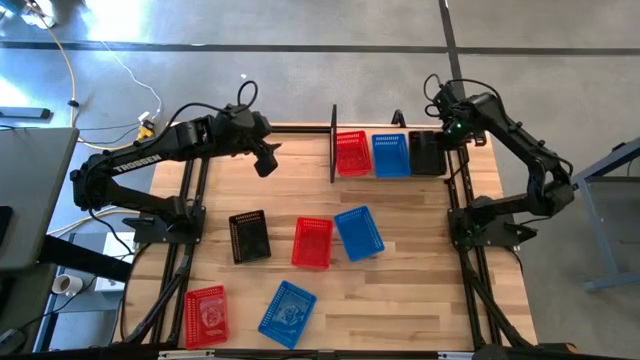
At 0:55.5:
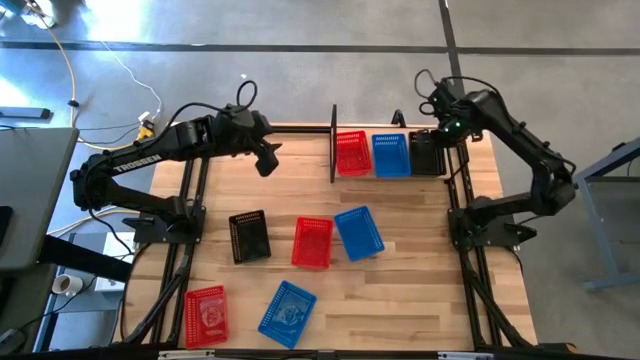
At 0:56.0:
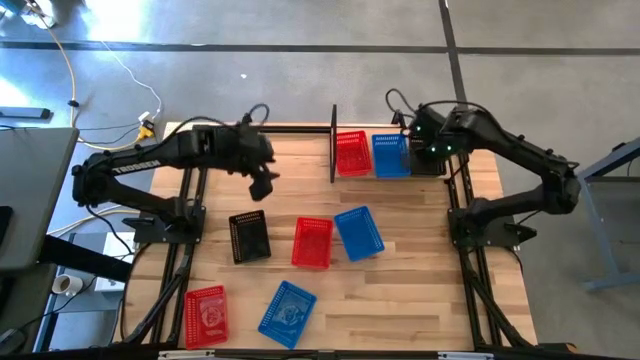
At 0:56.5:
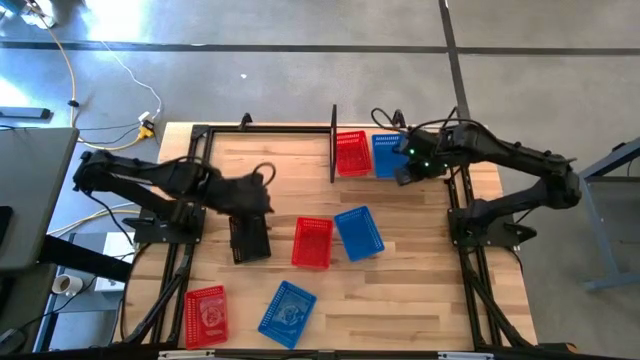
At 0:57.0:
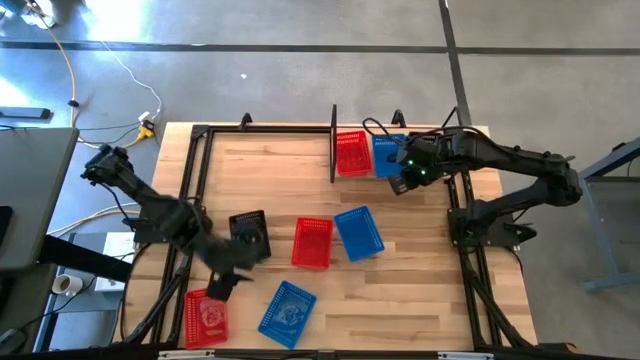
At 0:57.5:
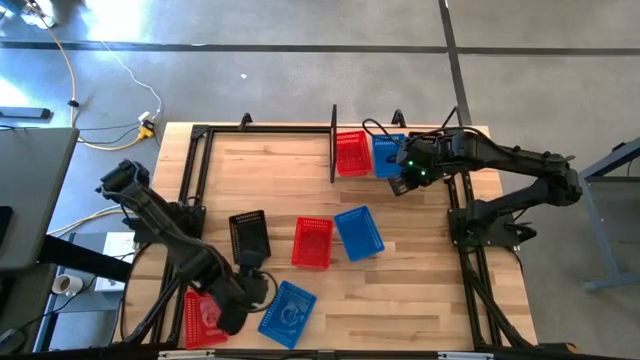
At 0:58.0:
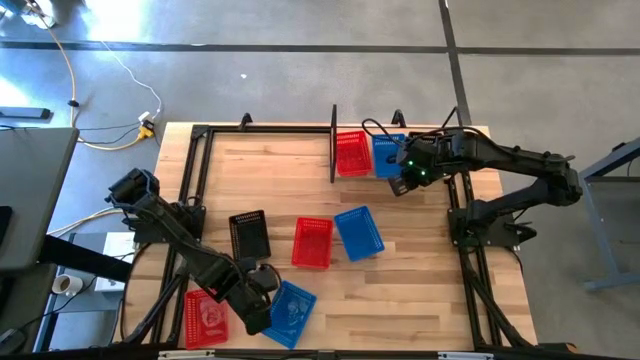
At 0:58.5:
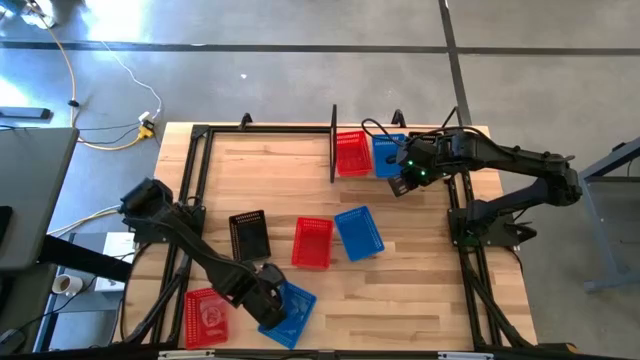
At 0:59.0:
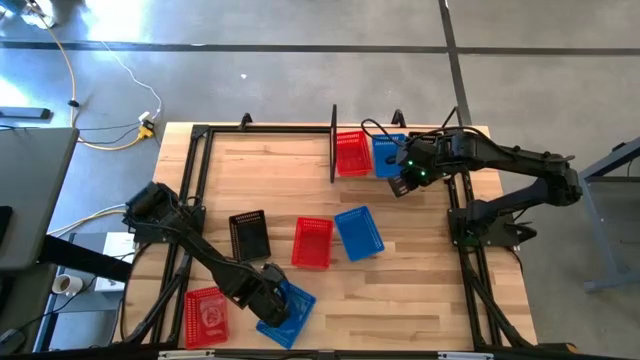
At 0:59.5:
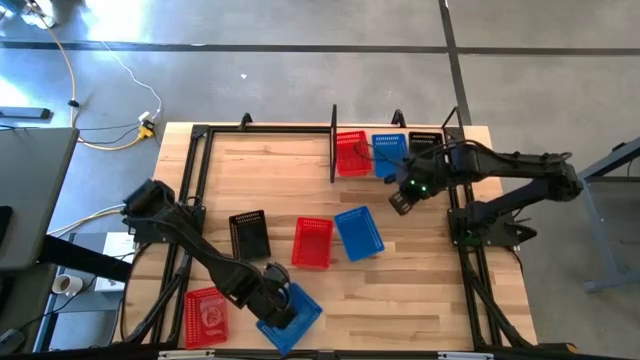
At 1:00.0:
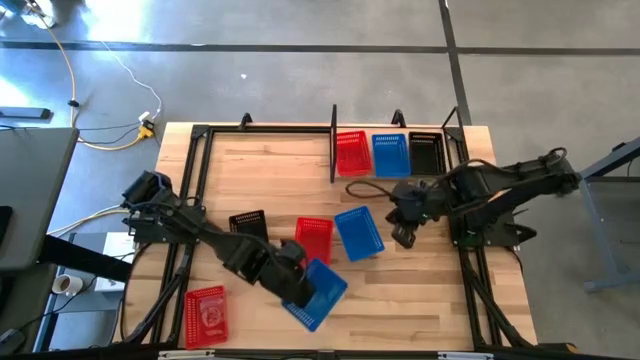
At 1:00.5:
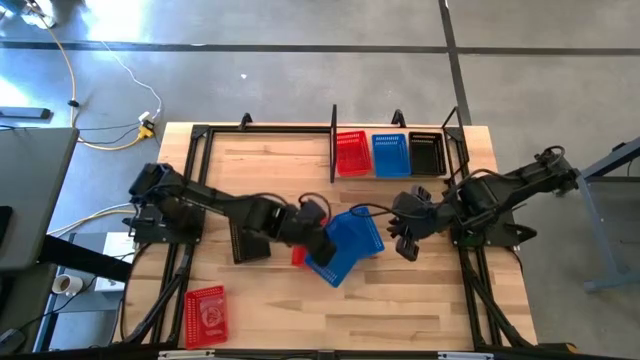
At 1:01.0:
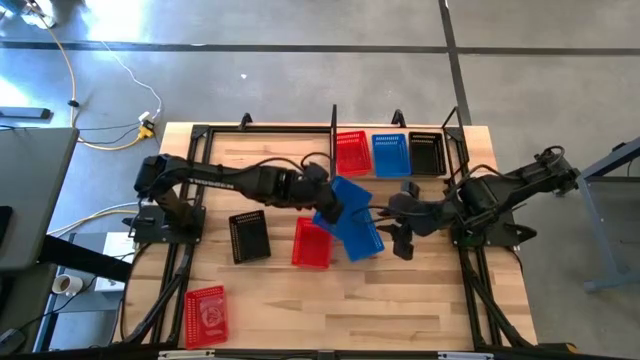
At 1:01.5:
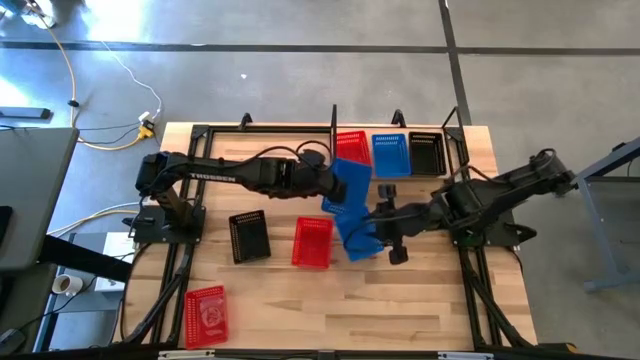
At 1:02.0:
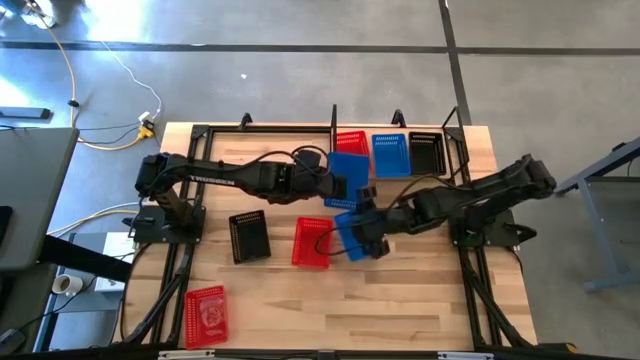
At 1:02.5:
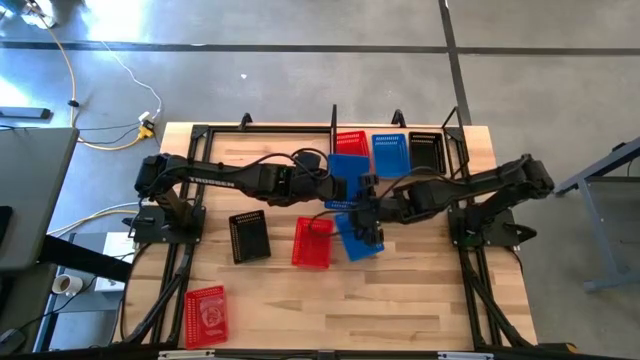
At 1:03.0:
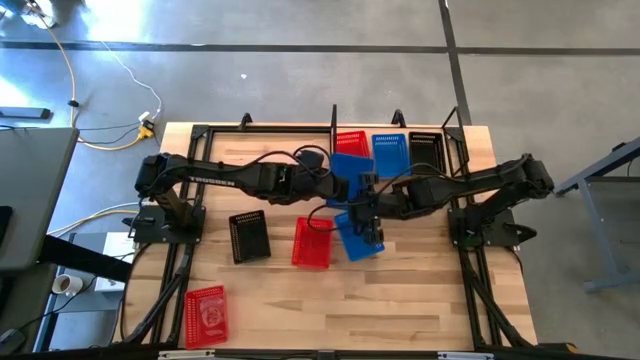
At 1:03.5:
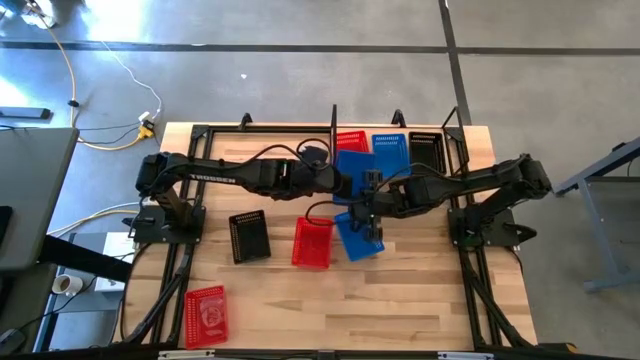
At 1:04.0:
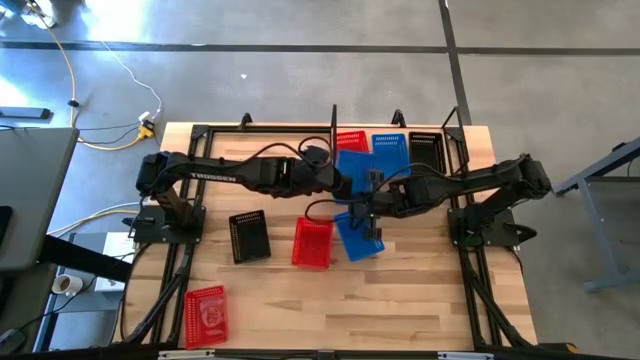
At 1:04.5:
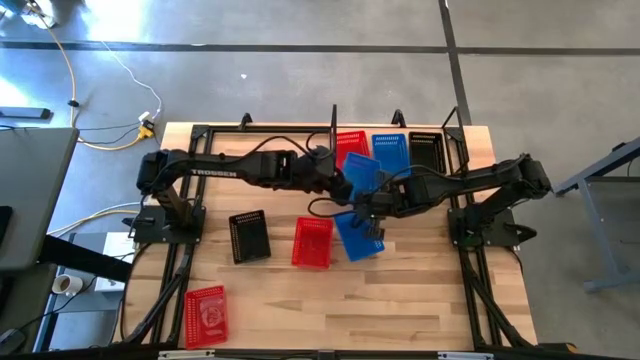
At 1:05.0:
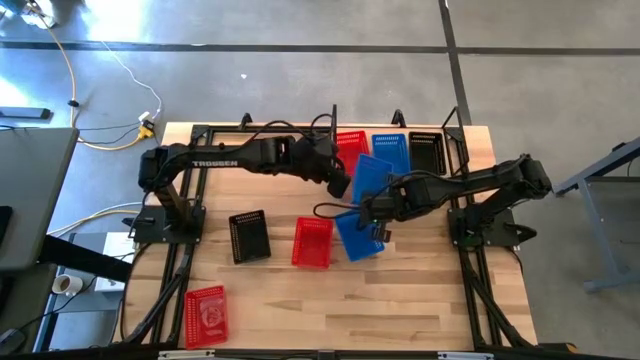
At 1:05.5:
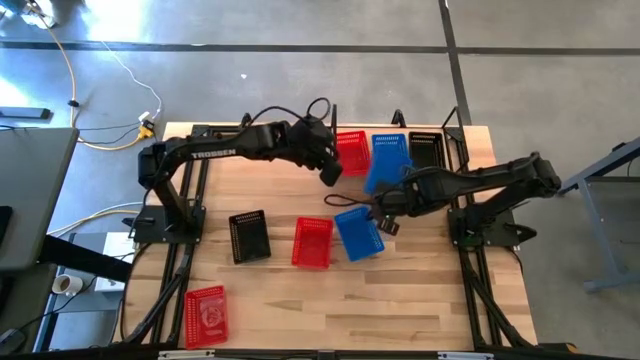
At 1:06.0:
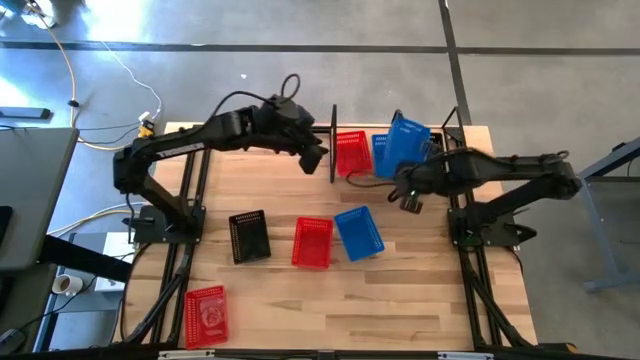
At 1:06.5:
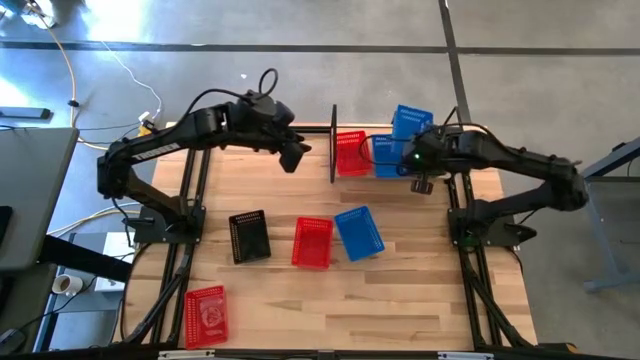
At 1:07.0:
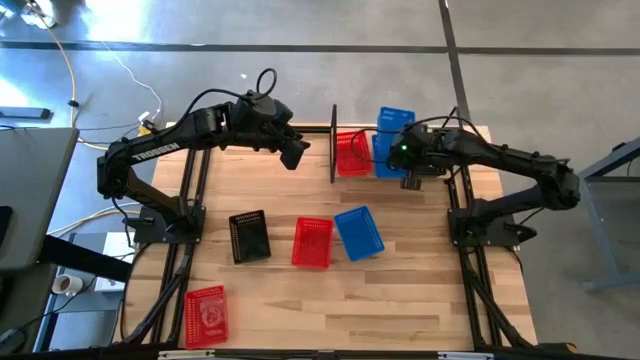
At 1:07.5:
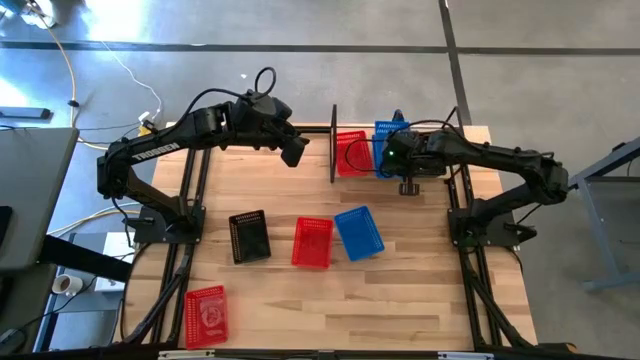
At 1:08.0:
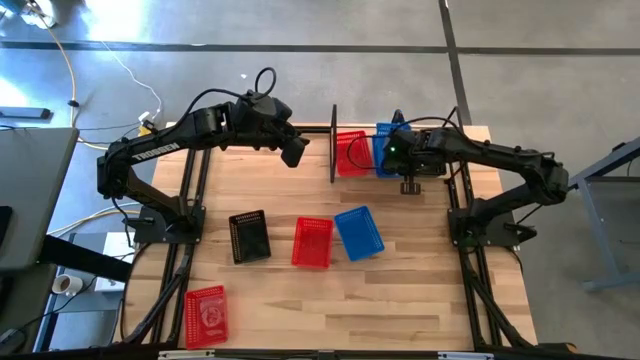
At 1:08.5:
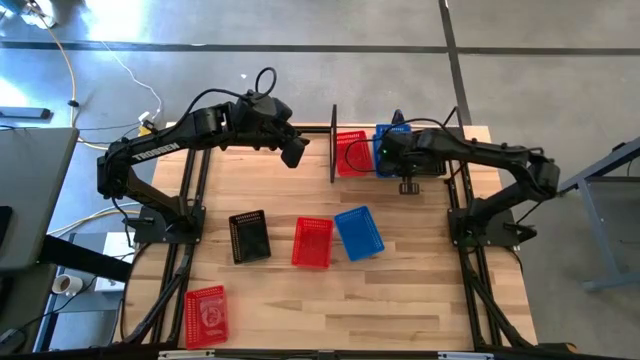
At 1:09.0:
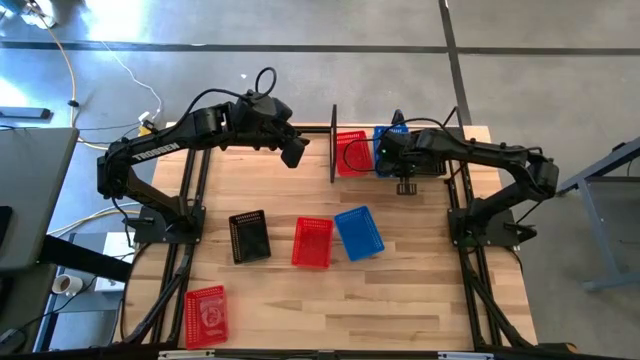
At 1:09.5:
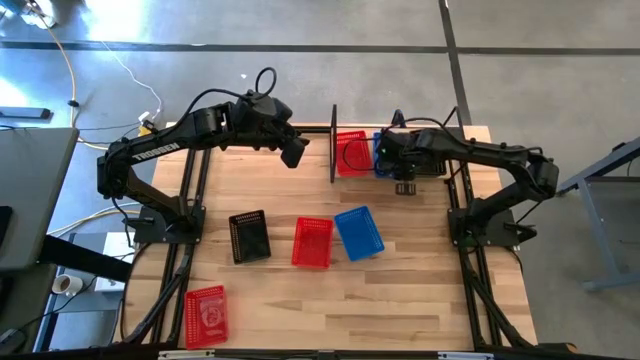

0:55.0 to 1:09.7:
Task: Stack baskets on shelf by color
Stack the bottom blue basket on the blue basket on the shelf

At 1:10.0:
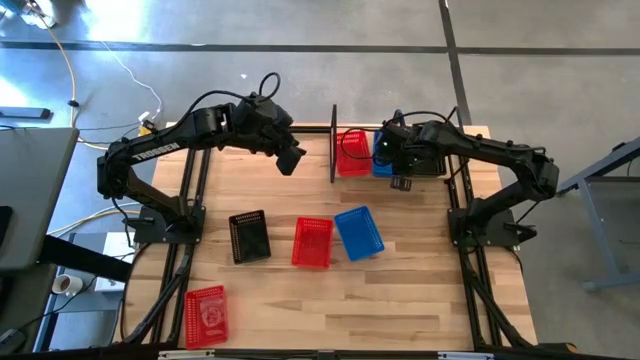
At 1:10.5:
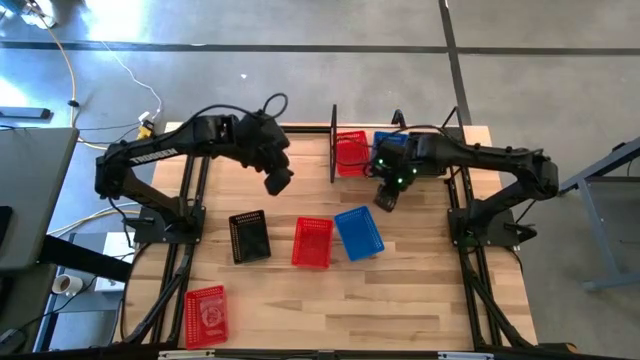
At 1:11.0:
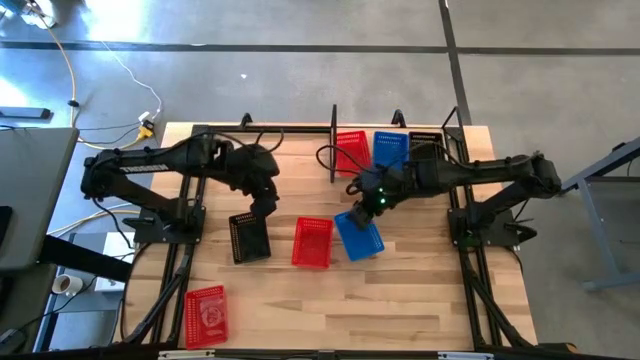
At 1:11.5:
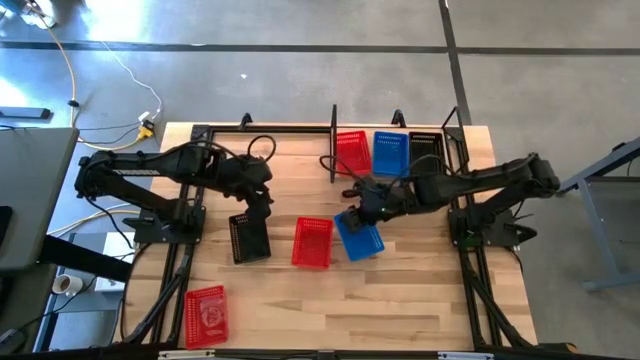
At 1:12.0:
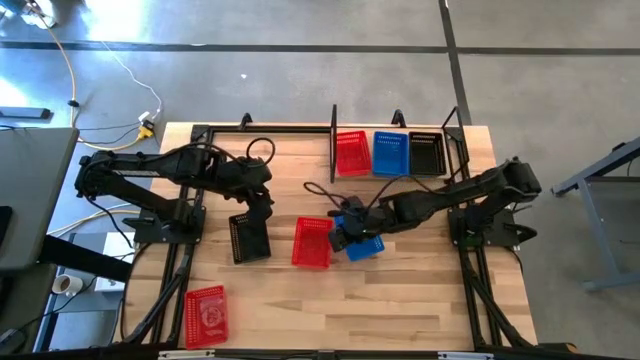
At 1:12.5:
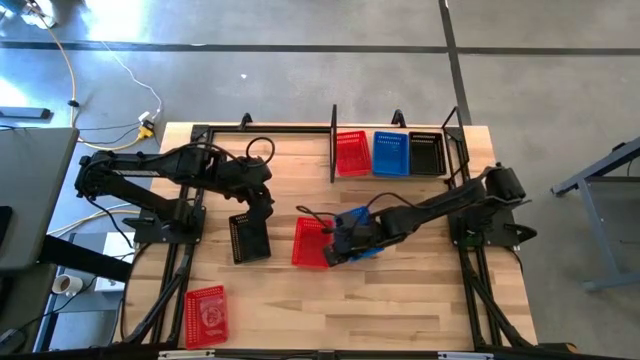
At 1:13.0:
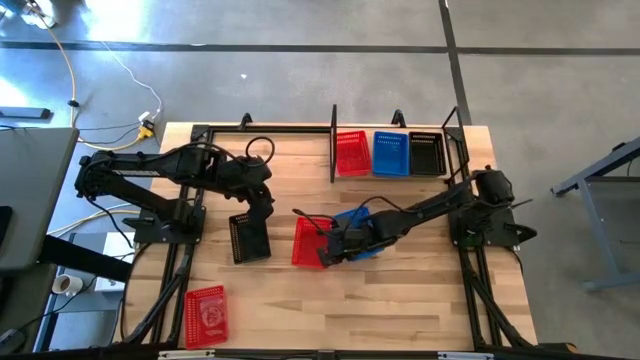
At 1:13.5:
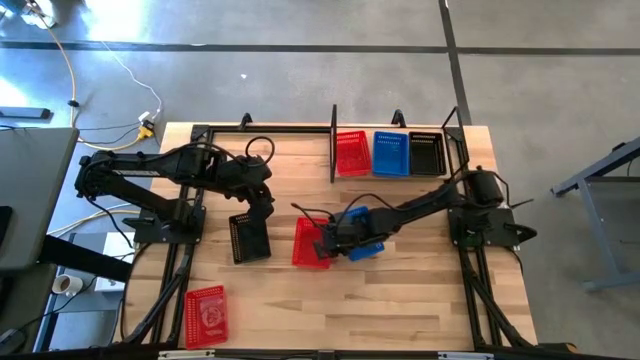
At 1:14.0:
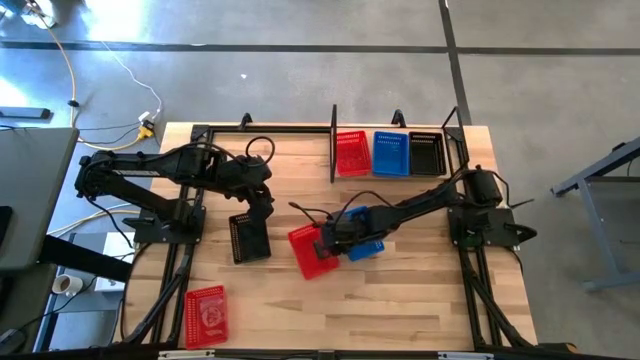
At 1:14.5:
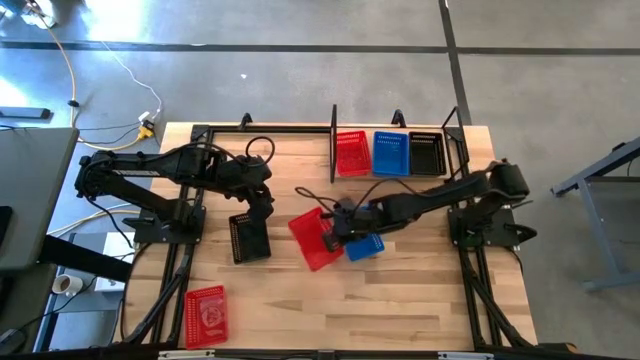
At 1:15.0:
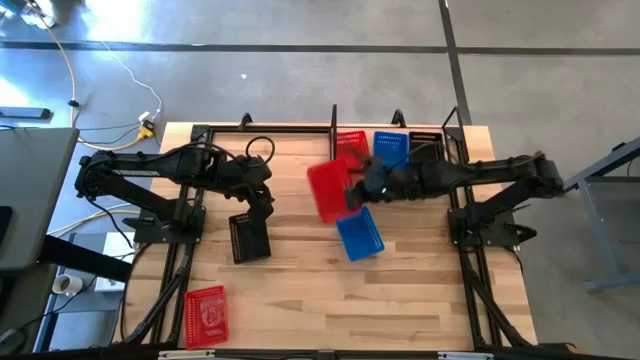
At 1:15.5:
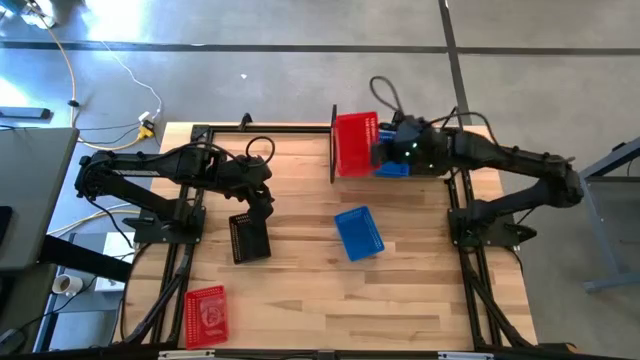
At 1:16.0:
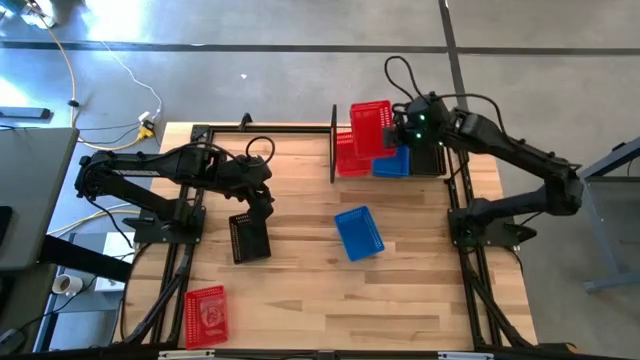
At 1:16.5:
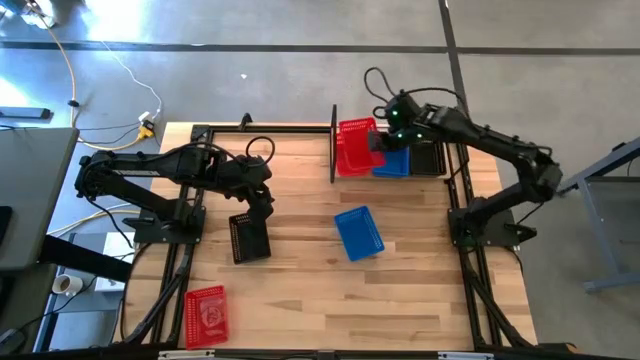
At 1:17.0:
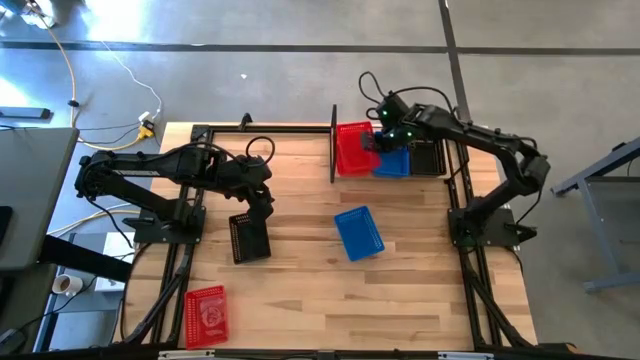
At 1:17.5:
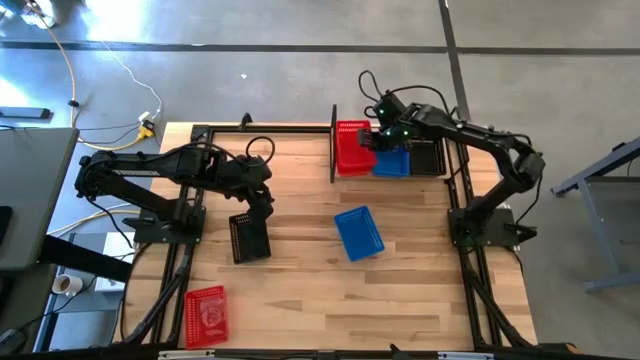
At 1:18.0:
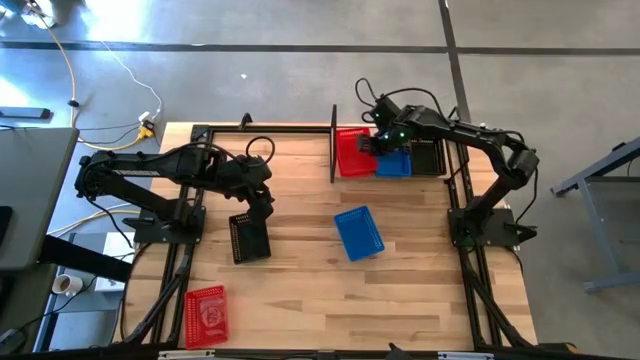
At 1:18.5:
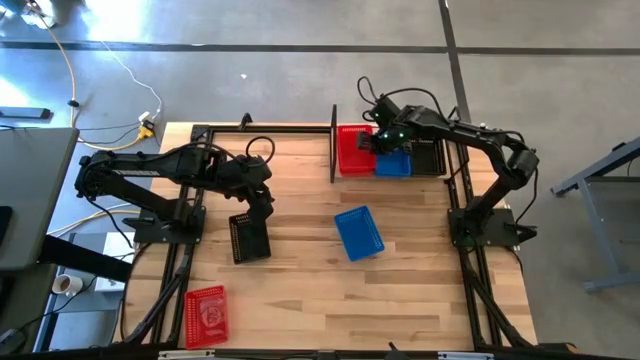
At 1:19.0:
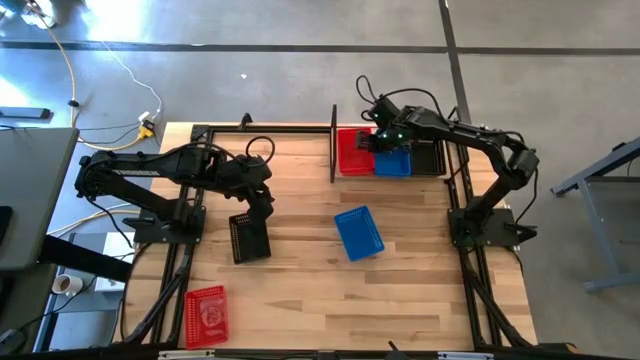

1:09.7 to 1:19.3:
Stack the top red basket on the red basket on the shelf
